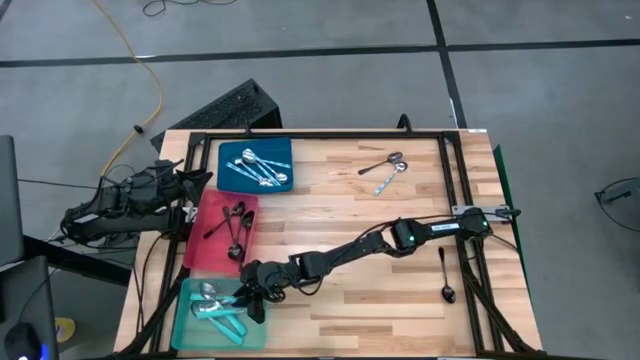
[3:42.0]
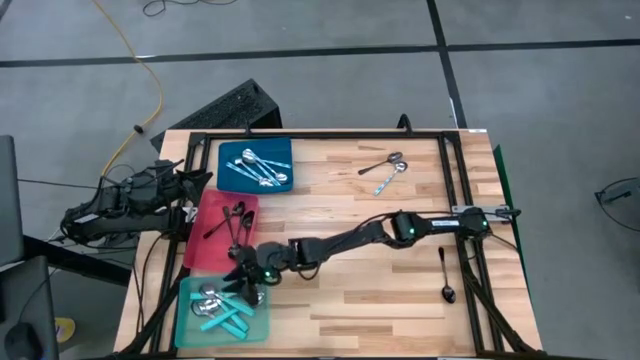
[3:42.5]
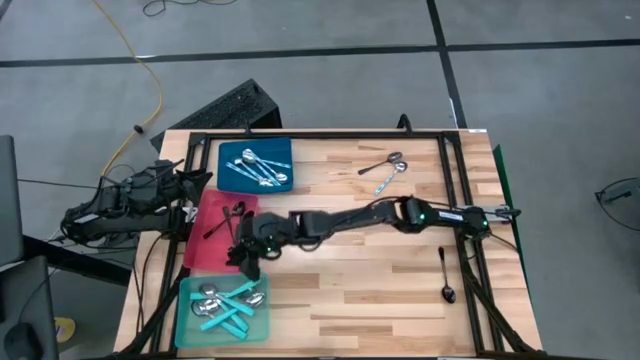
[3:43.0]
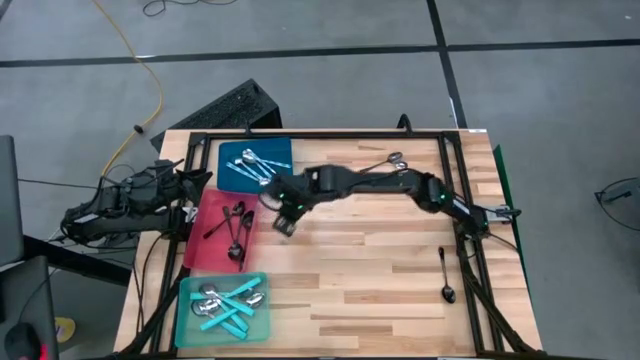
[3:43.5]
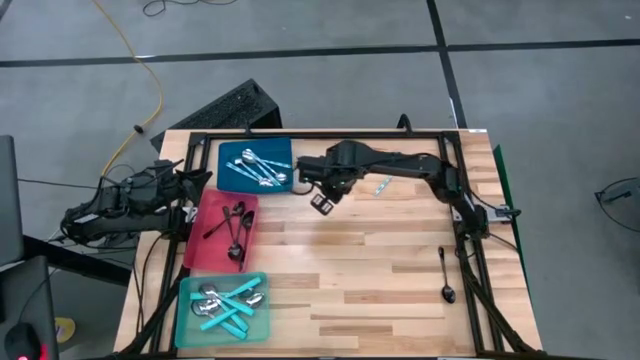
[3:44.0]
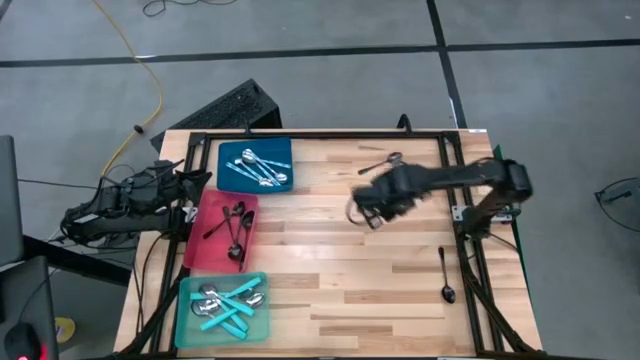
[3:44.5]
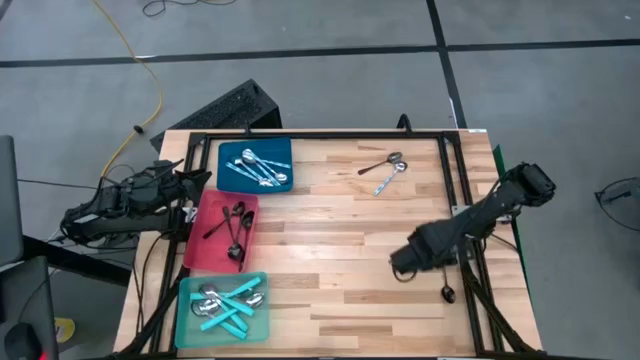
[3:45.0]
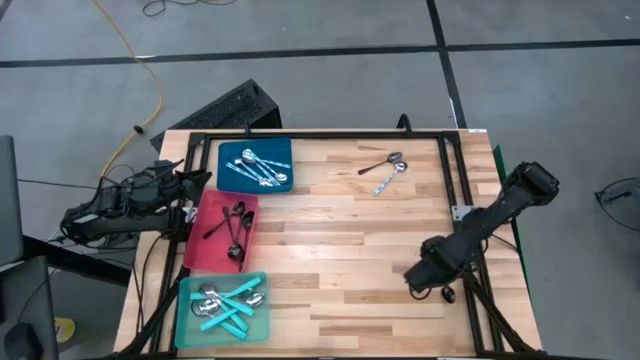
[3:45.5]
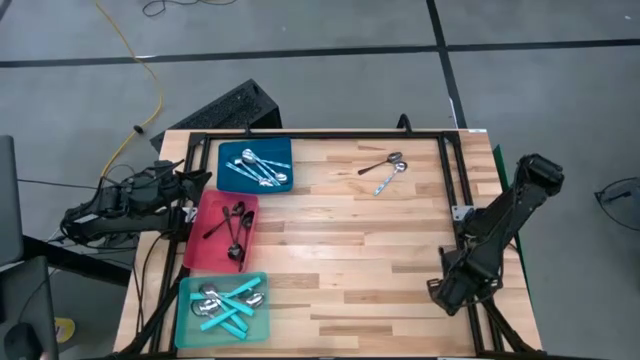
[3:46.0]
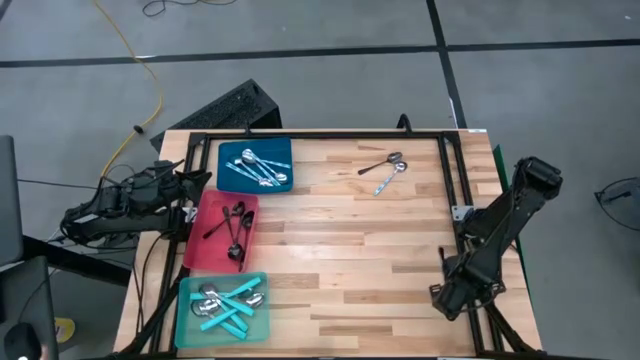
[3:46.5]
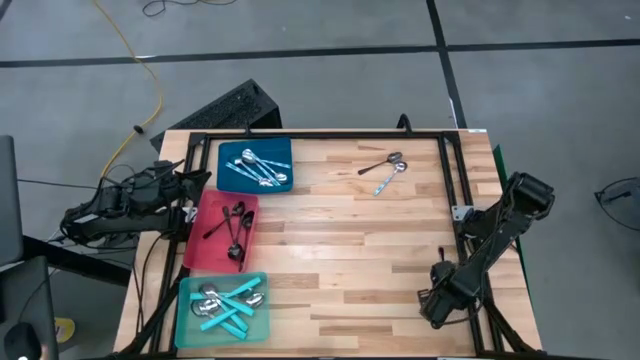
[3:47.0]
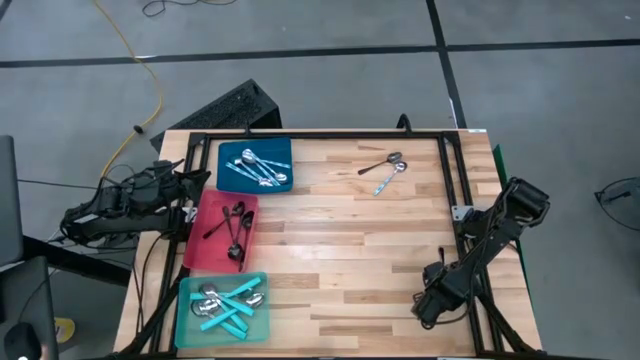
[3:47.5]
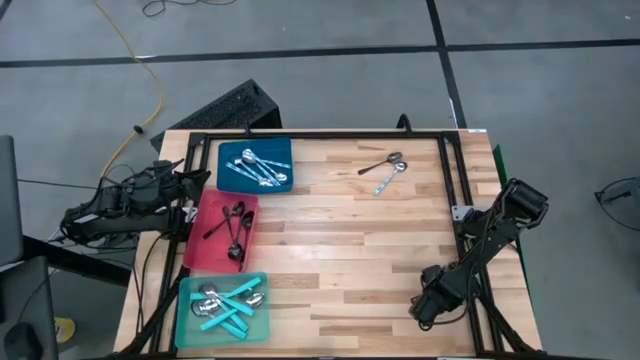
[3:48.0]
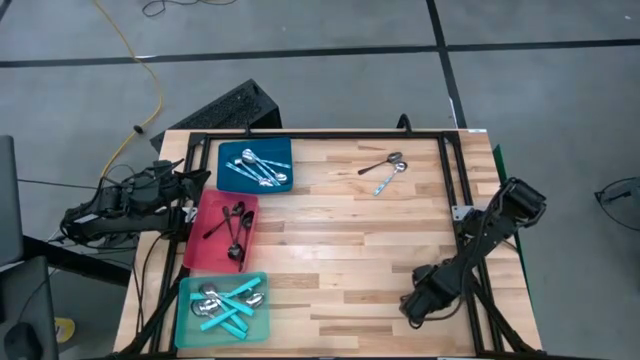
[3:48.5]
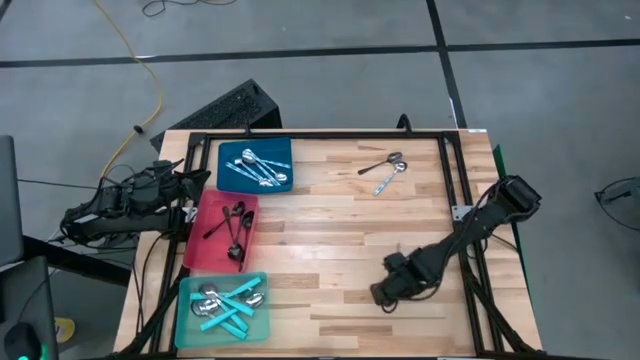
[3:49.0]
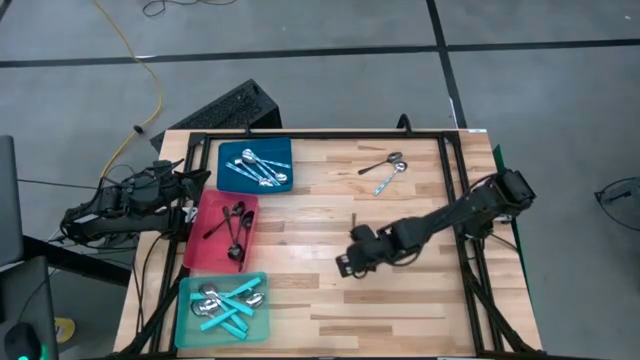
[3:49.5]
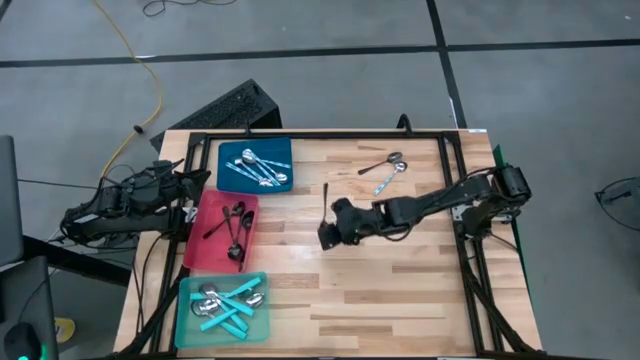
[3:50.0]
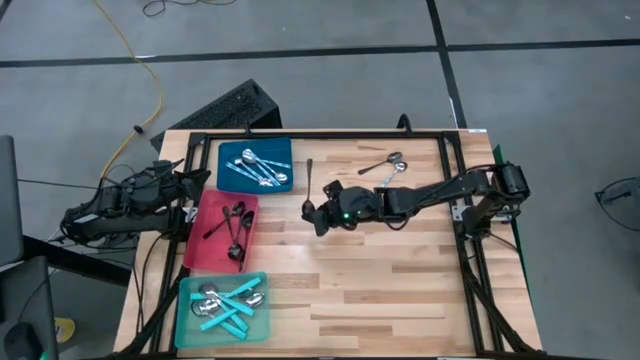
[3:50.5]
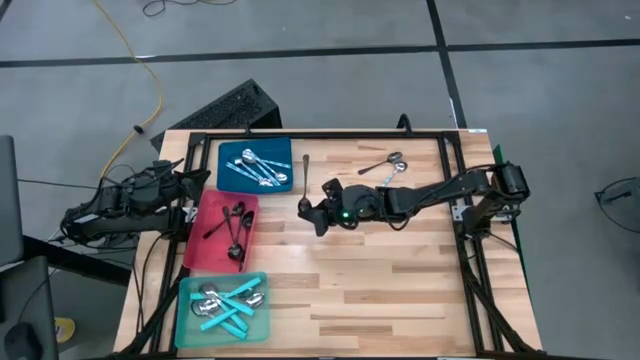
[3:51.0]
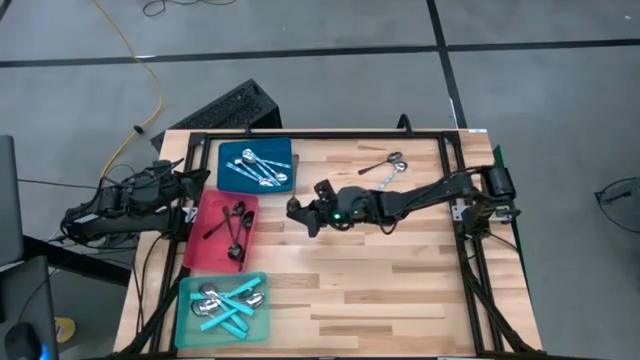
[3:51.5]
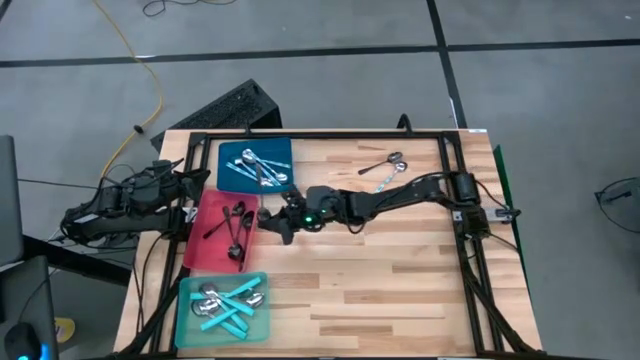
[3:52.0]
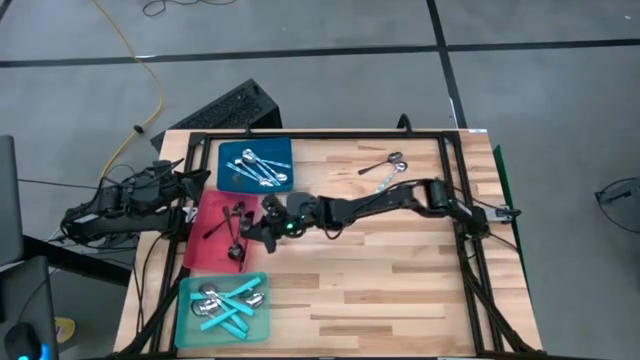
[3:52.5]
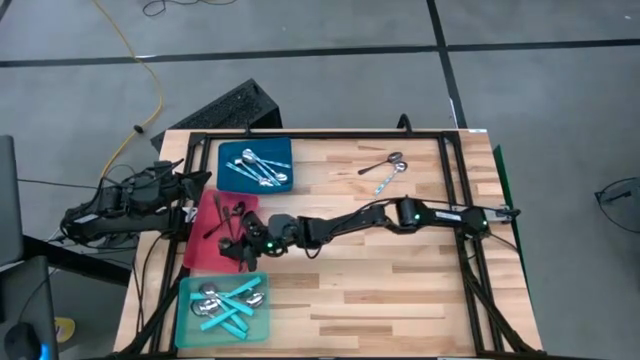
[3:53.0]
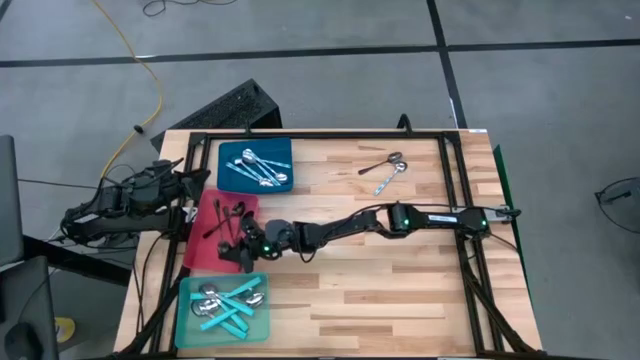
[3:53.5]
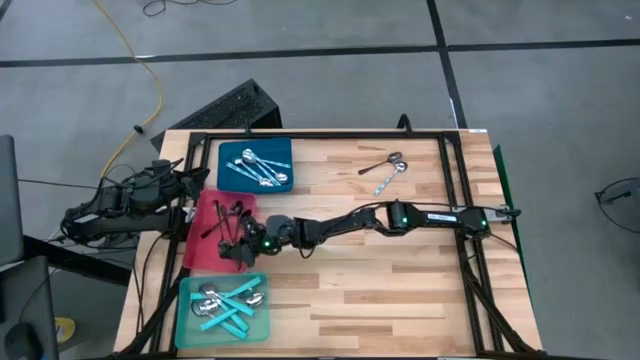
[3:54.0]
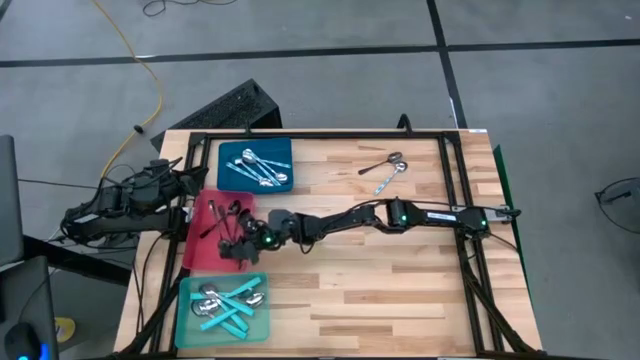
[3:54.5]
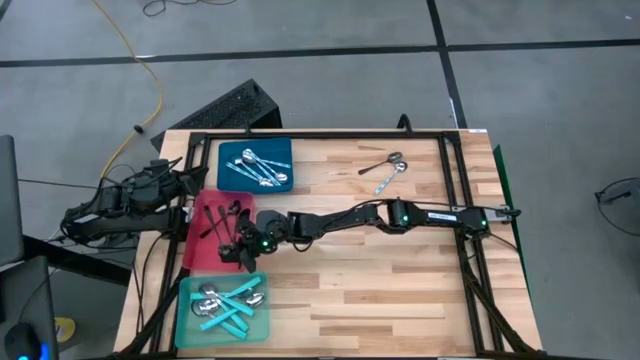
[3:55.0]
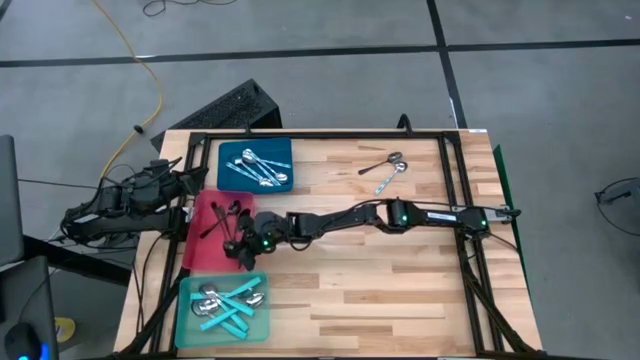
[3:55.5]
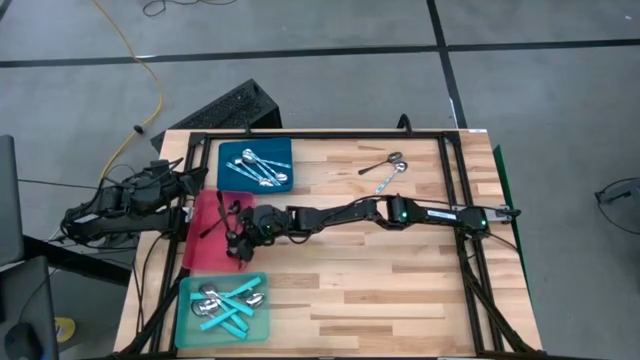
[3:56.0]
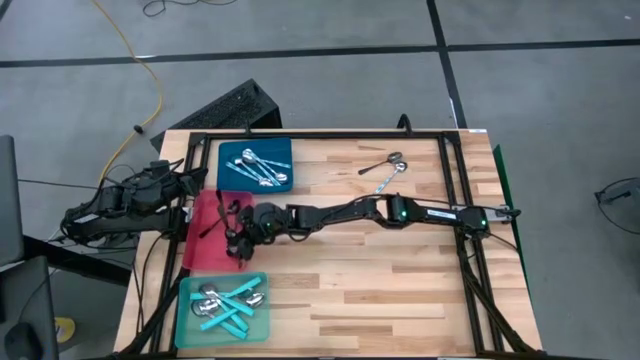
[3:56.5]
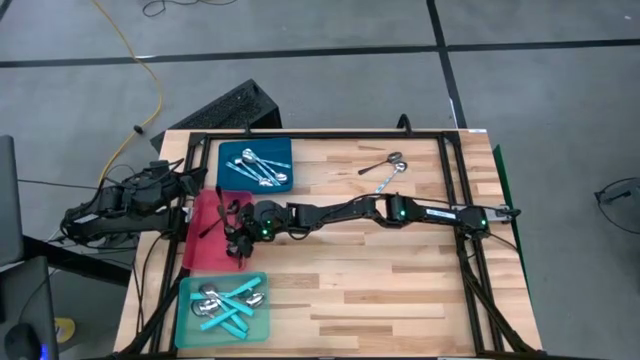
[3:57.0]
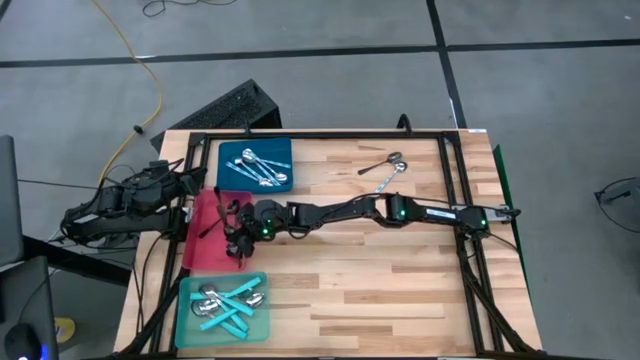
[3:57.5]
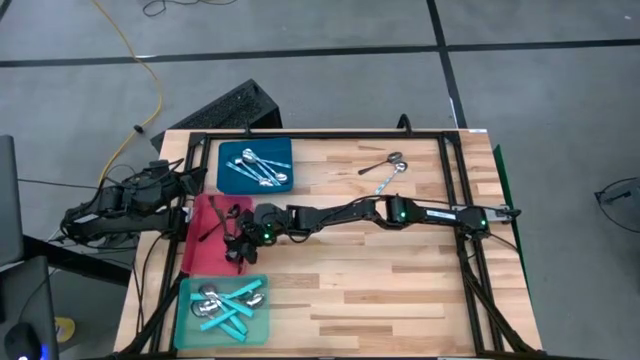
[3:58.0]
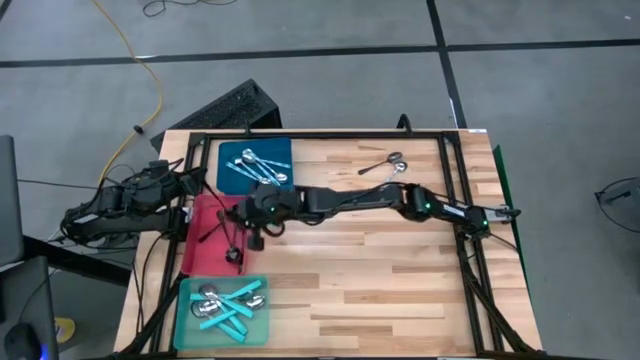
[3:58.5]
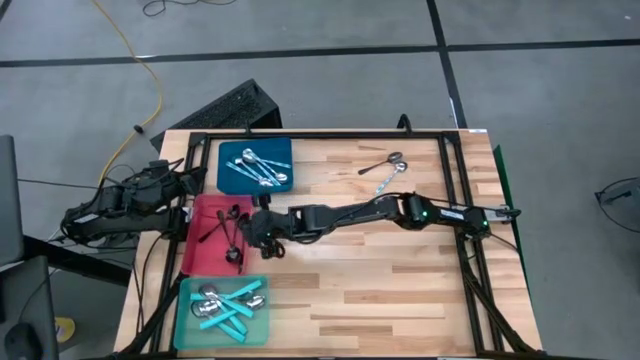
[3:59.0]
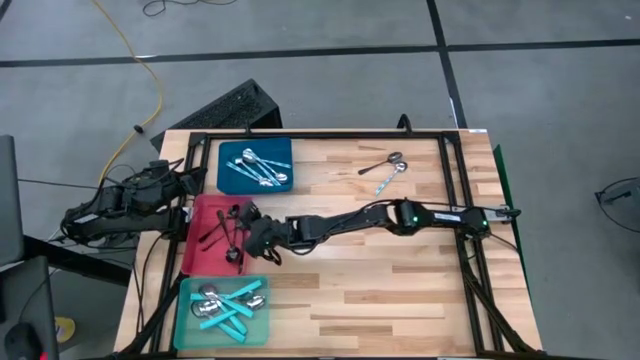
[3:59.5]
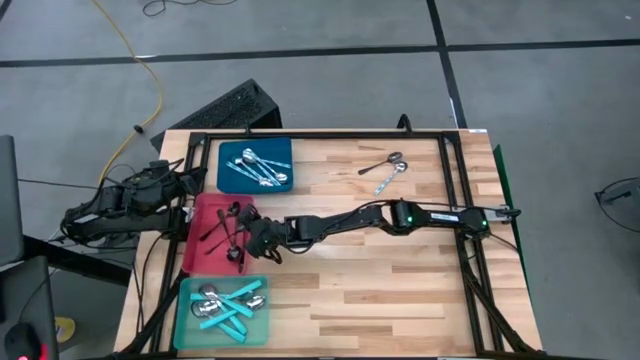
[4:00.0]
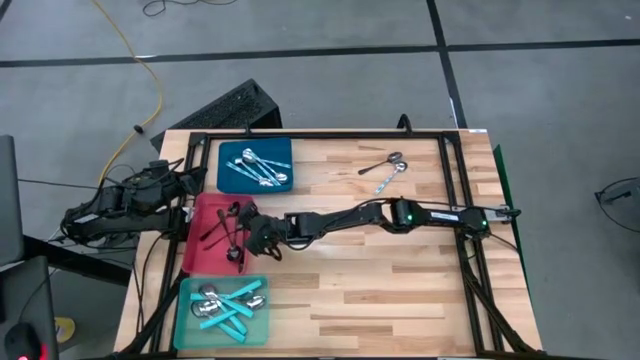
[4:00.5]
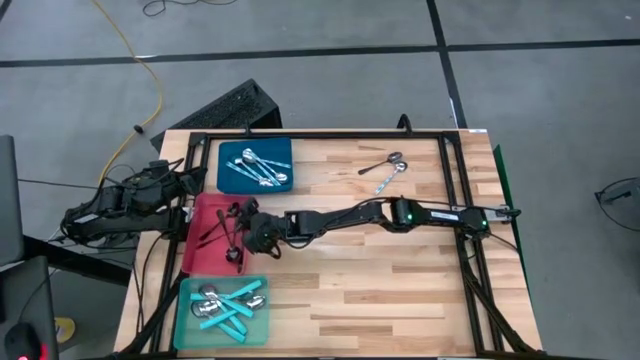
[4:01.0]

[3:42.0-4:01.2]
Task: Sort silverware by color (type)
Put the black spoon into the red bin
